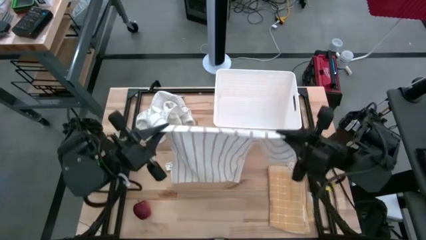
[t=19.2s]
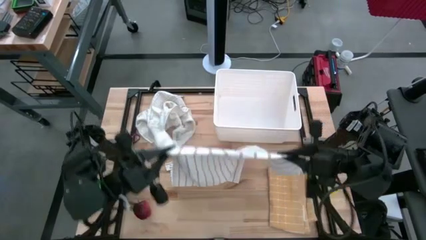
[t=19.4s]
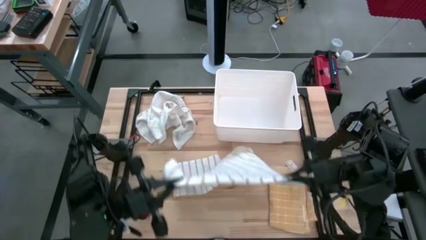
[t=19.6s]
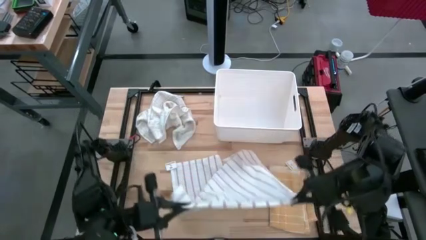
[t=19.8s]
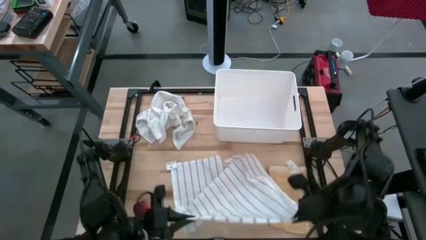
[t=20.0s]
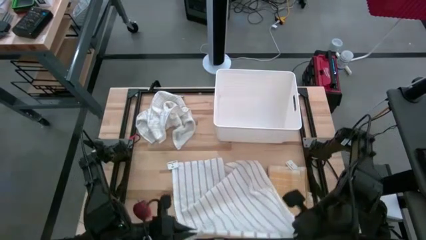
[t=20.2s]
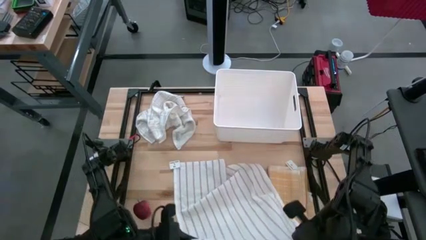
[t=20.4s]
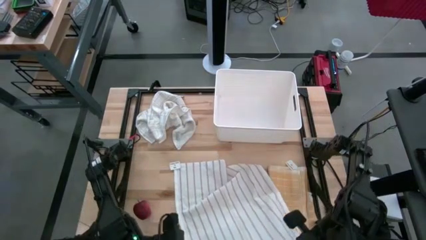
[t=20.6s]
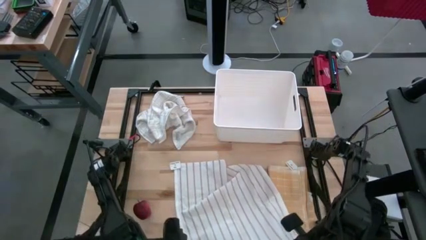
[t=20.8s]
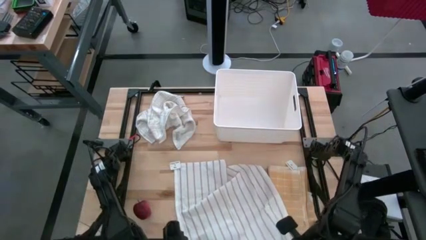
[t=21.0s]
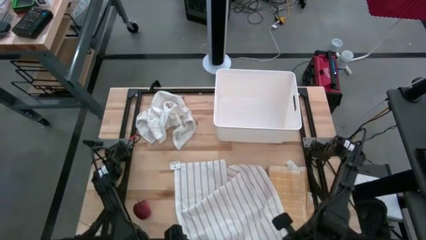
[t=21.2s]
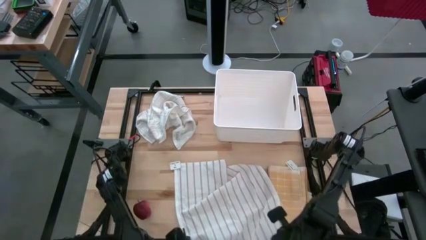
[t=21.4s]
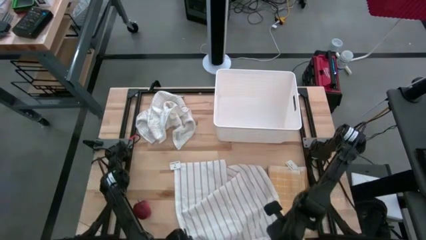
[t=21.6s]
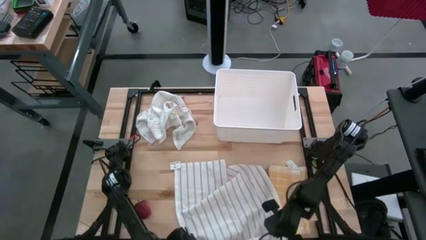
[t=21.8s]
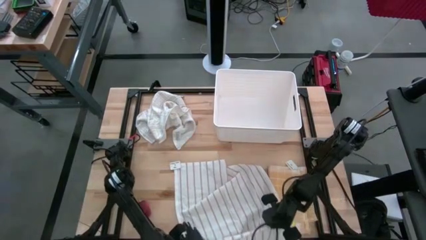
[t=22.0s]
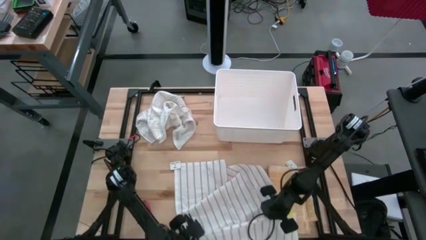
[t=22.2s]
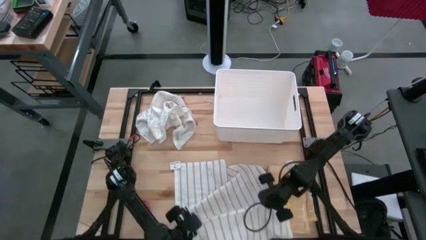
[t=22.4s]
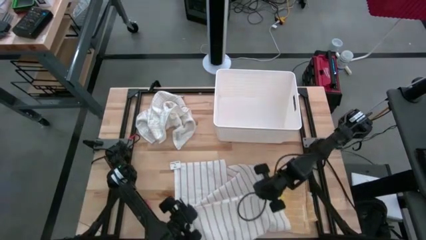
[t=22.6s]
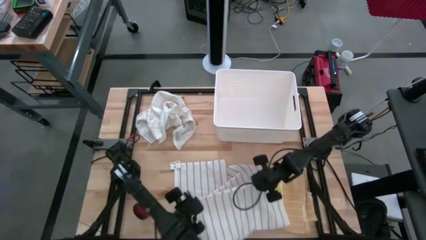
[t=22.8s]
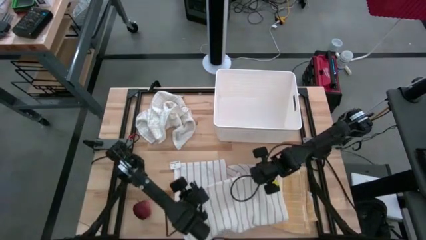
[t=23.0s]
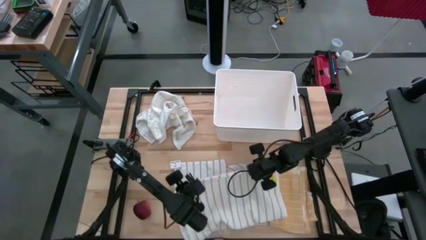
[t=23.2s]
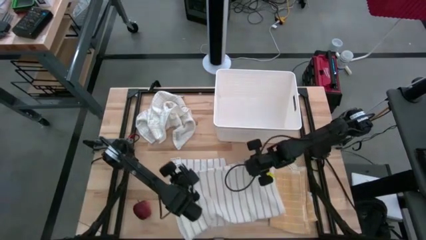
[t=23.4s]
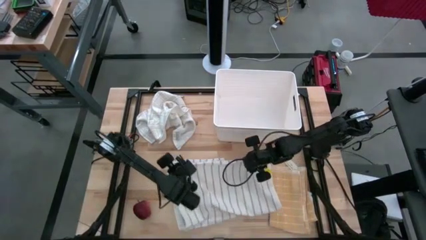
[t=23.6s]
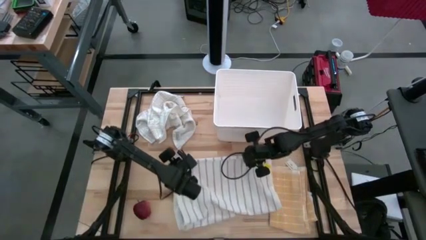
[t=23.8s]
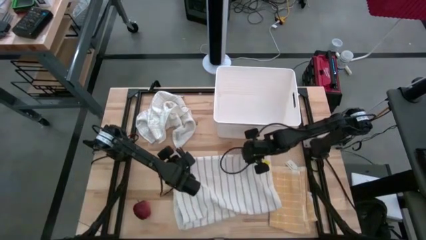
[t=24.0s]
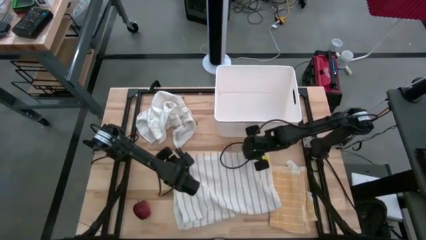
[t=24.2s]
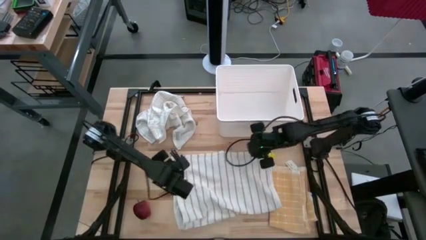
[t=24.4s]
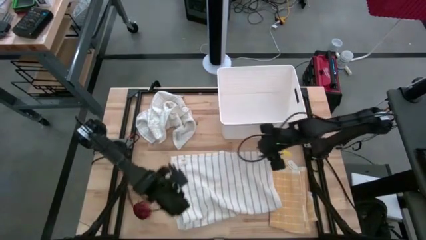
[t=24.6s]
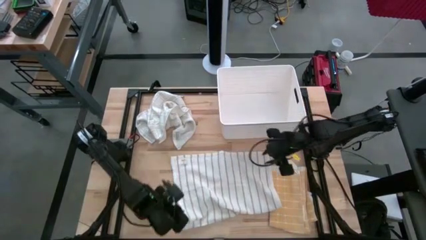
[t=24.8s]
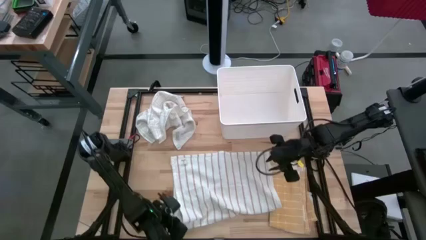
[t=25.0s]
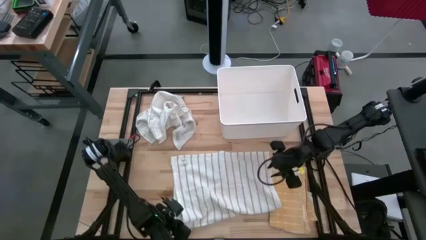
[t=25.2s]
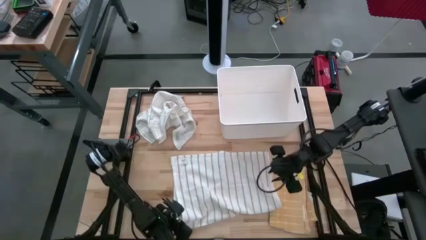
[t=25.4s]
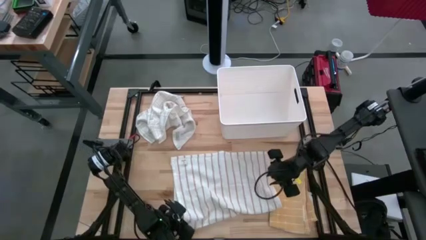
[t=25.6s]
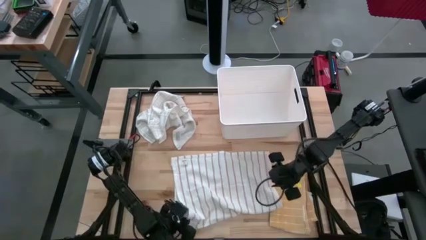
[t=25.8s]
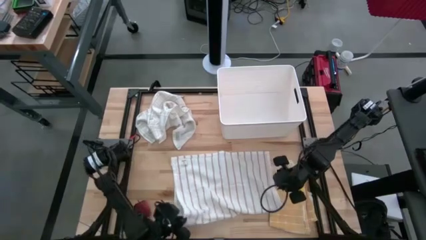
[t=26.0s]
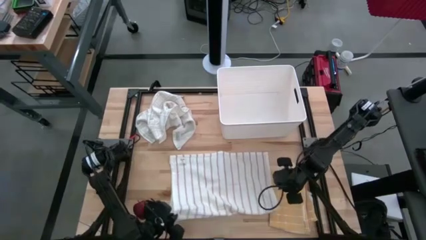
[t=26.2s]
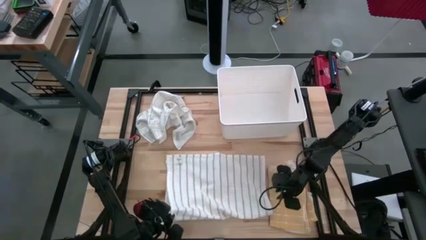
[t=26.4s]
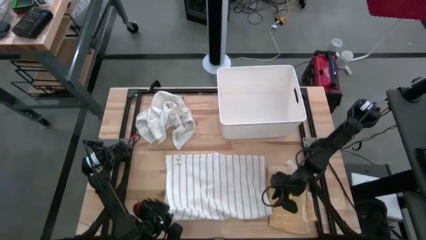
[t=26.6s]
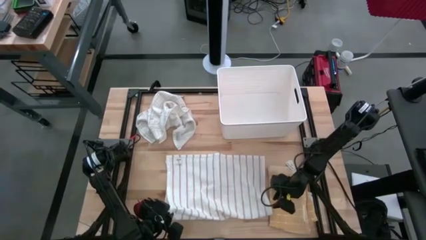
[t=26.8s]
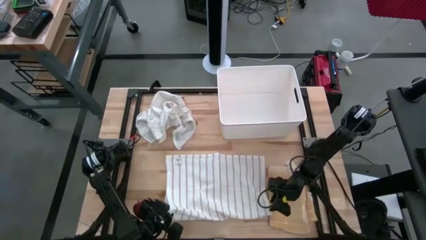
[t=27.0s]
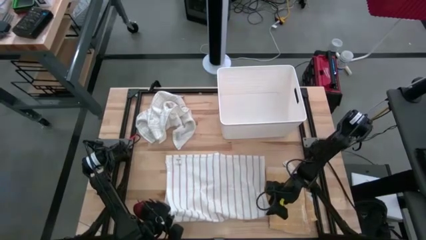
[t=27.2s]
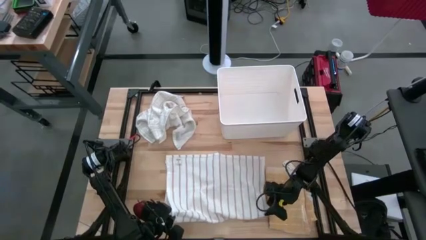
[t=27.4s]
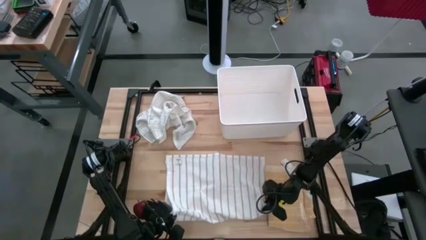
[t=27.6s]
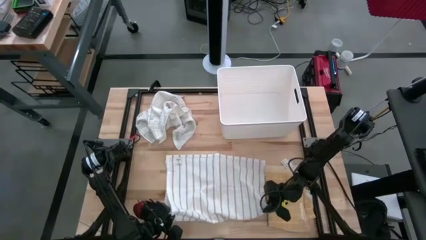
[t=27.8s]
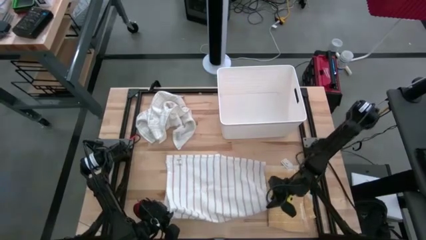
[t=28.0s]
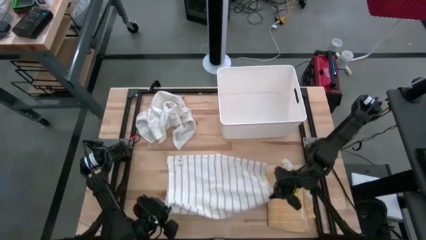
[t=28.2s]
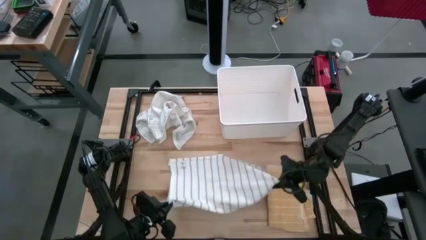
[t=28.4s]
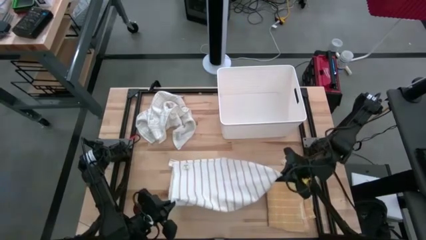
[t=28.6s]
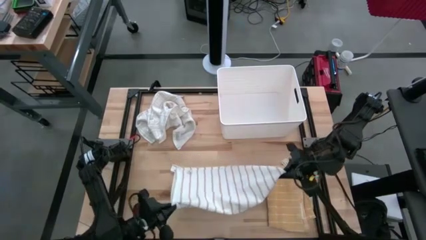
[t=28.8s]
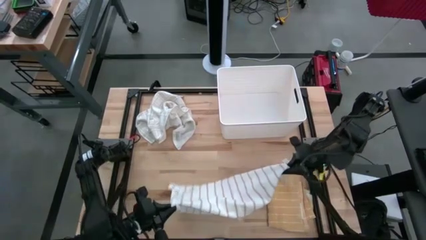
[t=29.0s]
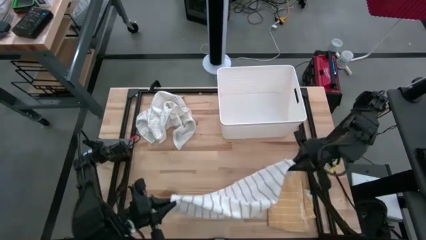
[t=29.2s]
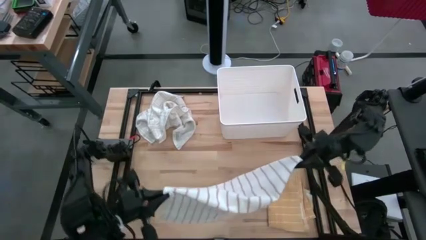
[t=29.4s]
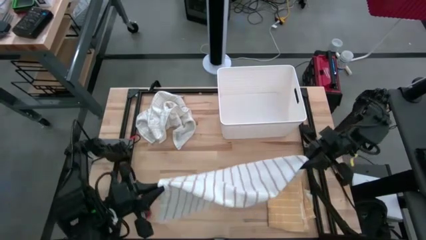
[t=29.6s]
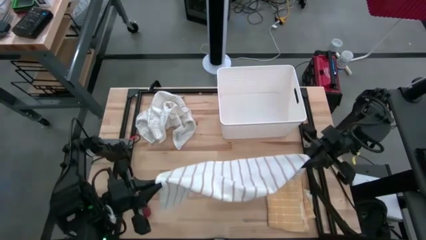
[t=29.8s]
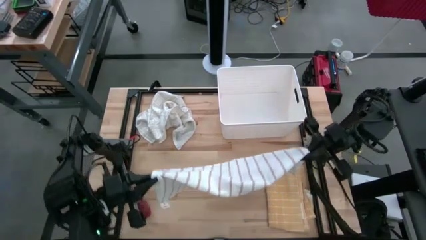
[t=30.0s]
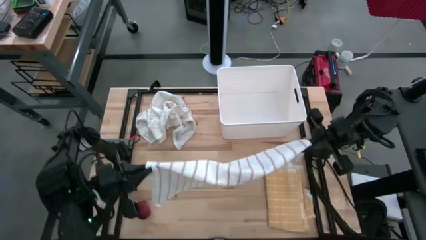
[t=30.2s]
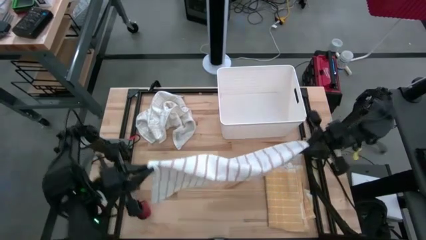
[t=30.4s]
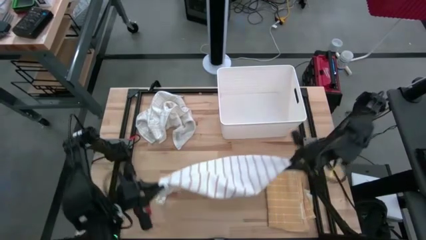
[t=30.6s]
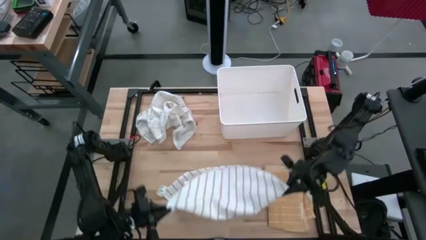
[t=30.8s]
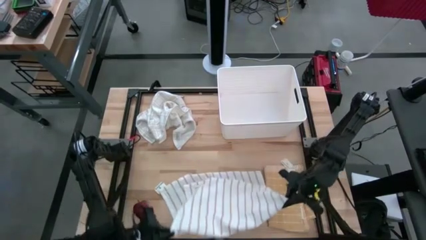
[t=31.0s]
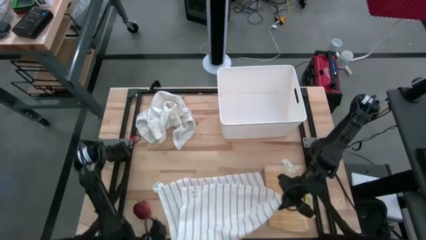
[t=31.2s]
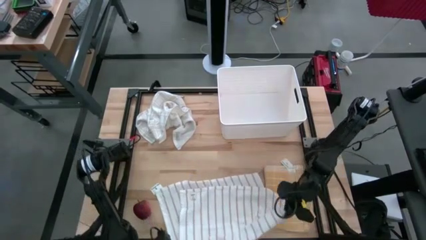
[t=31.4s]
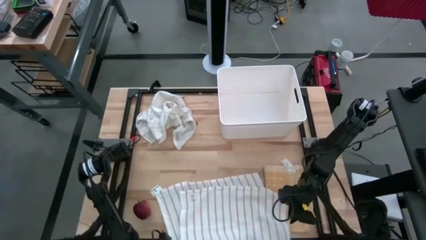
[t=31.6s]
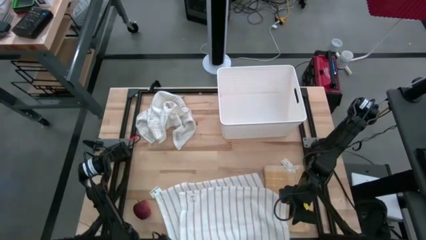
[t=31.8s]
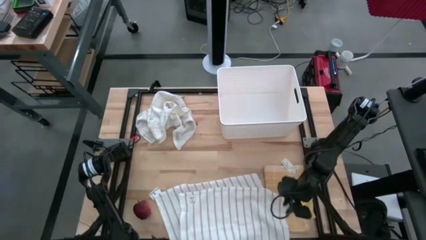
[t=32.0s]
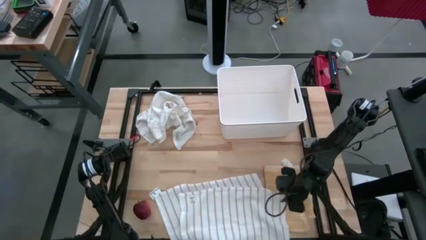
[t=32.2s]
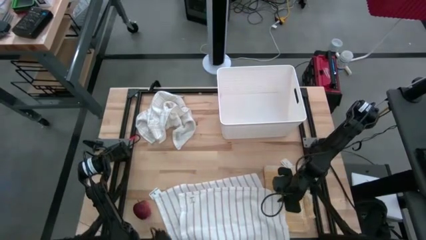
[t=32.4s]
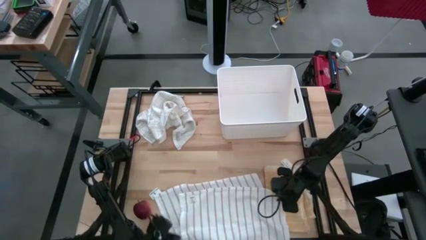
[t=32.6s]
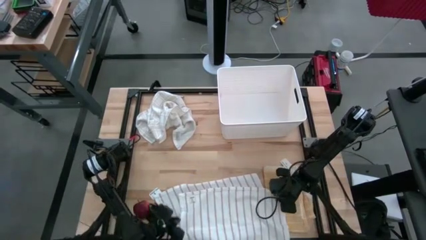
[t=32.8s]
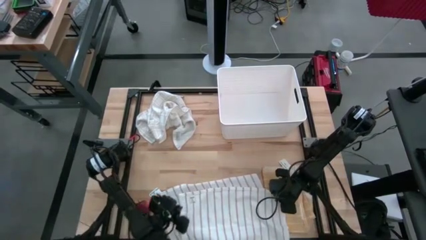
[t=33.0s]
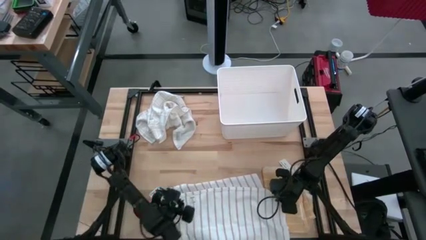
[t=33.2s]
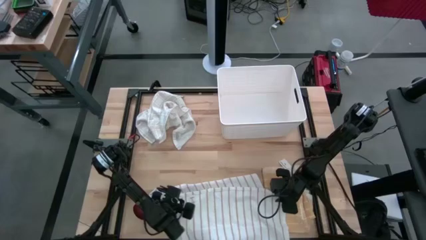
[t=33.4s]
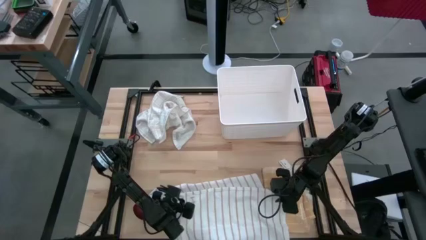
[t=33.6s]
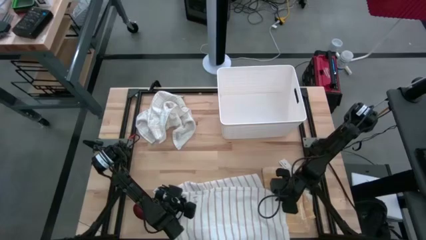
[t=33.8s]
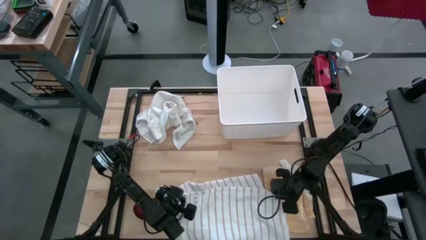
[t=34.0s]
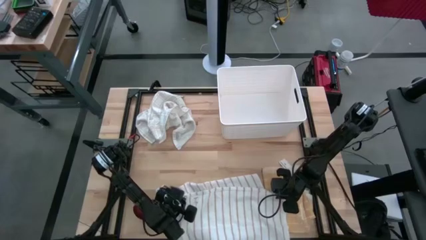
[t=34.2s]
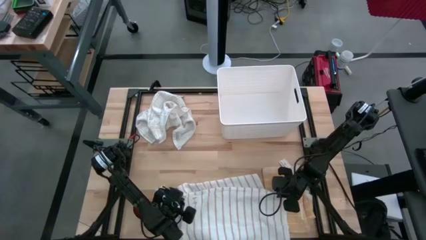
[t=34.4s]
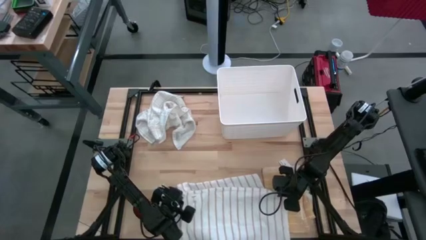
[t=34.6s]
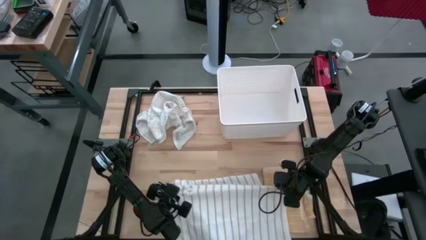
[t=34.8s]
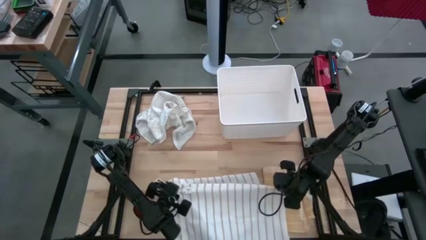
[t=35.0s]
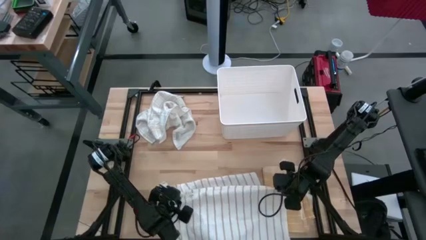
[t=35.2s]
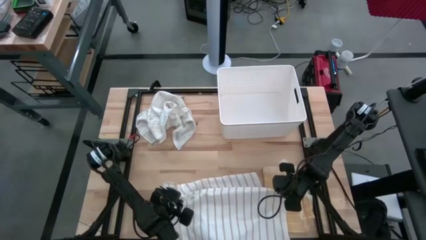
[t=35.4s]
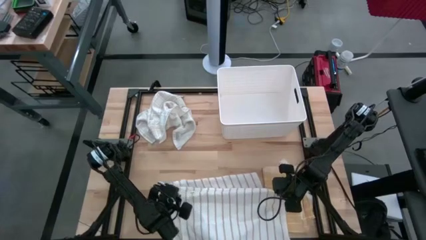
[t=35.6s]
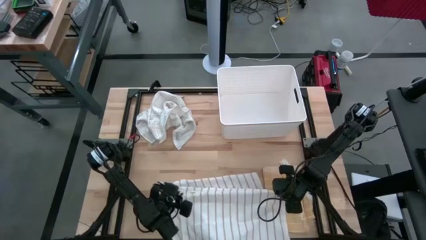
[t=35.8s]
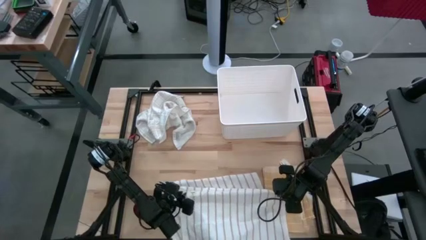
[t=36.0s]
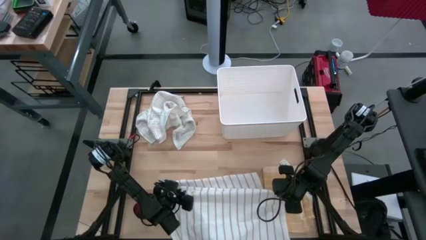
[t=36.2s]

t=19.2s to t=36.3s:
Task: Fold towel
Fold the white striped towel
